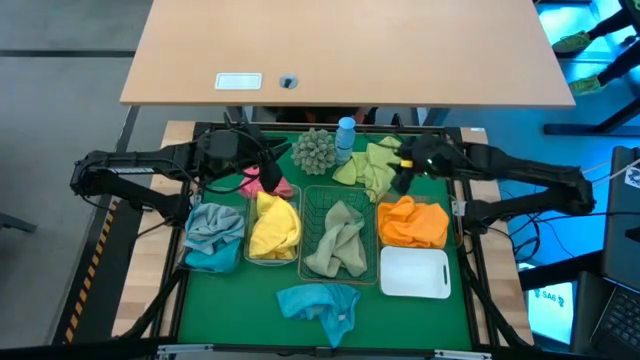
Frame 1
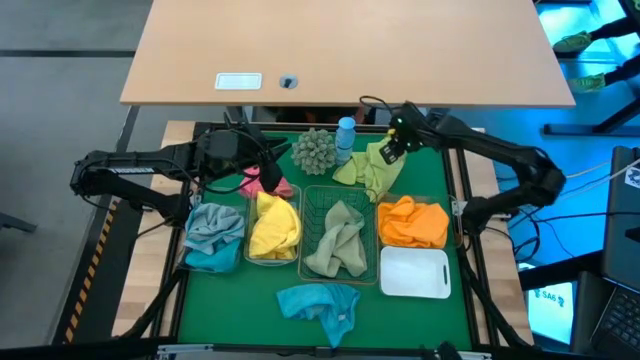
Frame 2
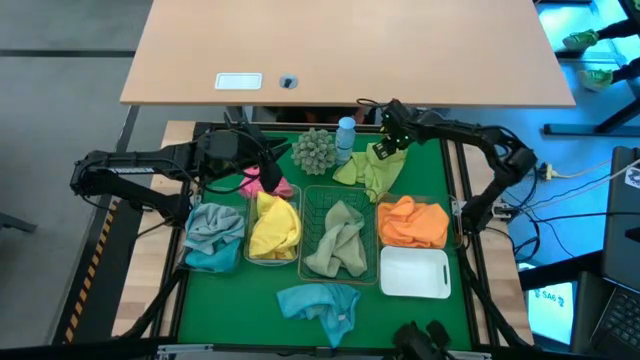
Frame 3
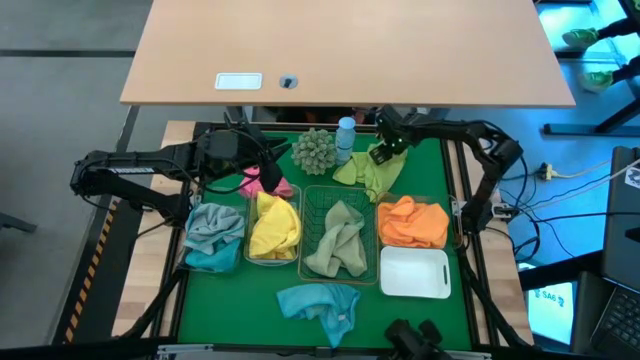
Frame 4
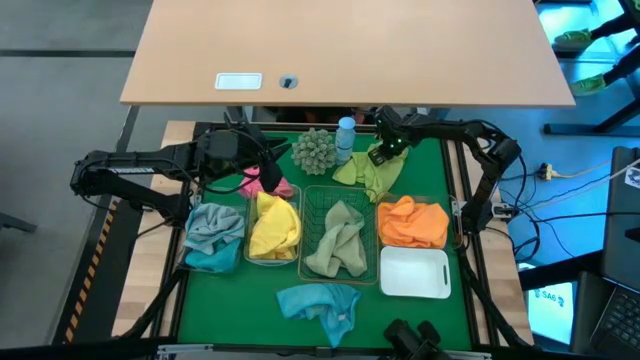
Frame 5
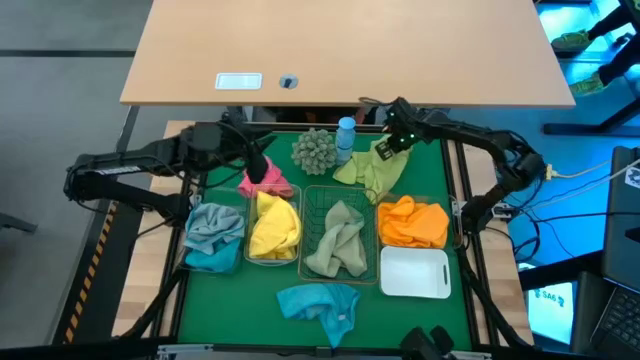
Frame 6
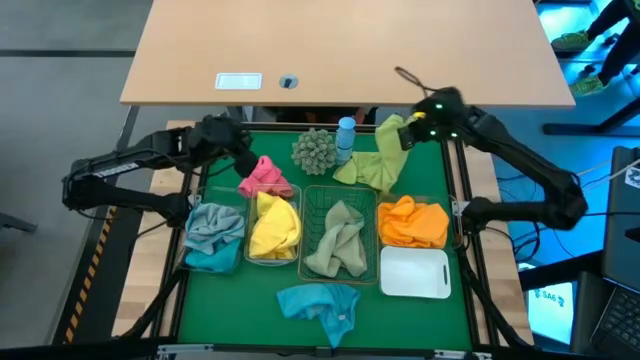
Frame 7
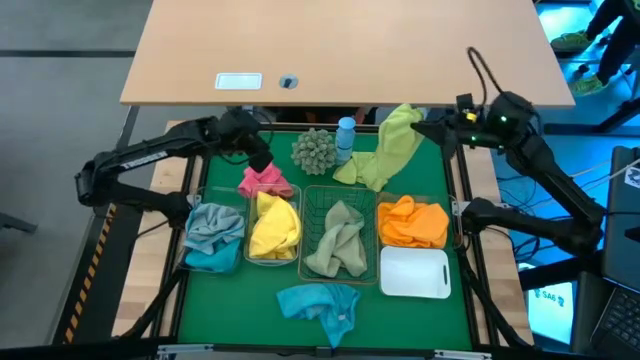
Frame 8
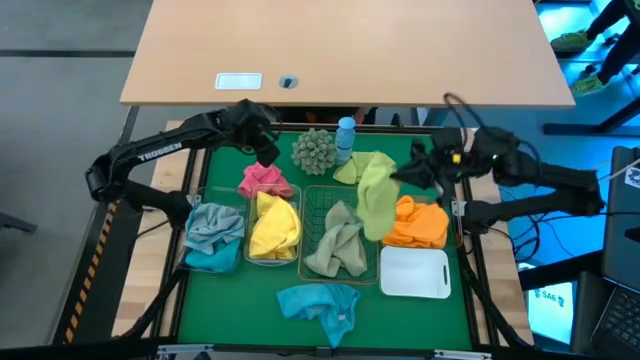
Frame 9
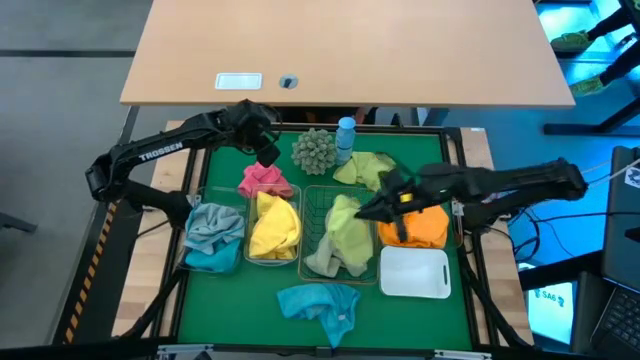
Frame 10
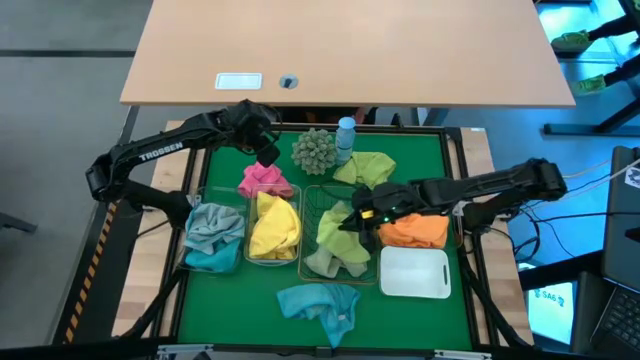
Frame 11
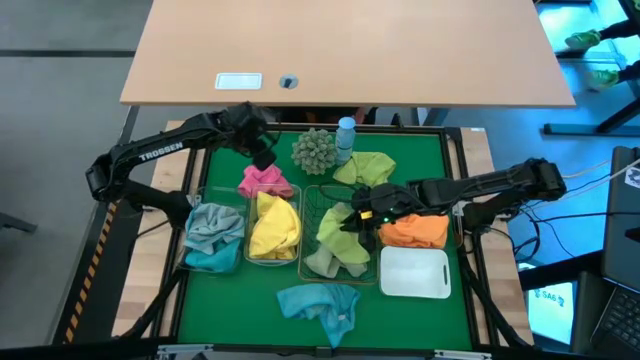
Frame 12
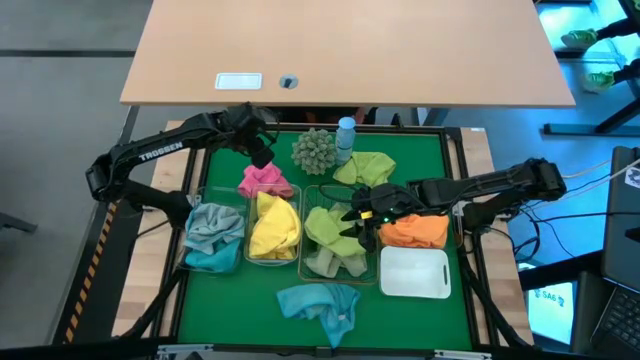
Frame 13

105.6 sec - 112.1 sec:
Task: Sort microfiber towel by color & place in baskets
Put the top right green microfiber cloth into the black wire basket

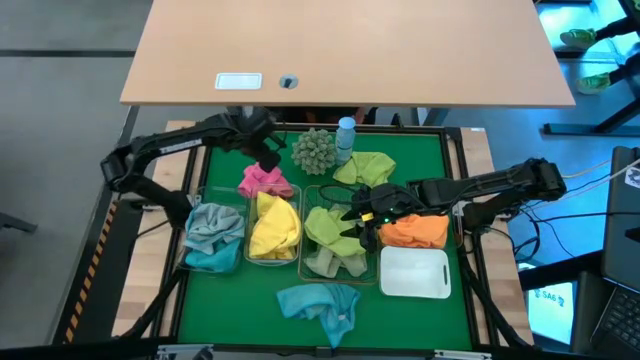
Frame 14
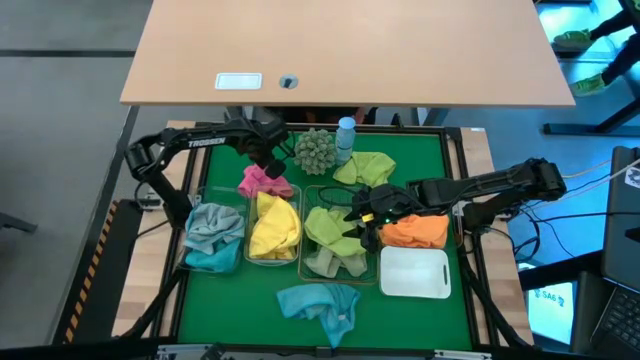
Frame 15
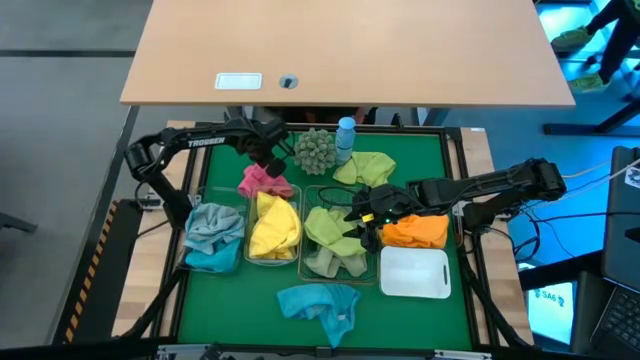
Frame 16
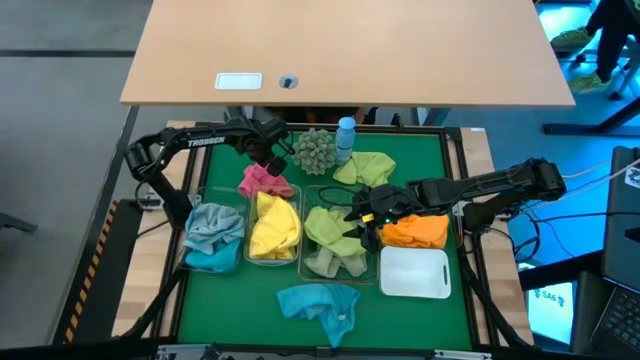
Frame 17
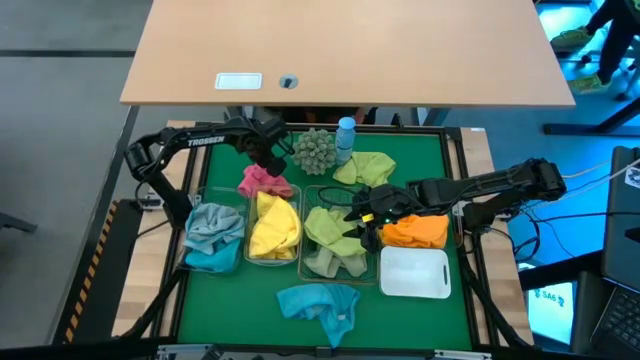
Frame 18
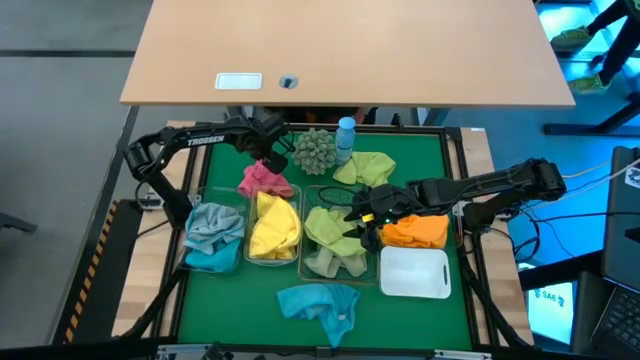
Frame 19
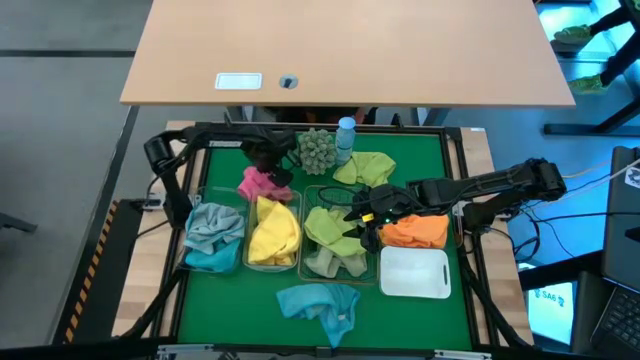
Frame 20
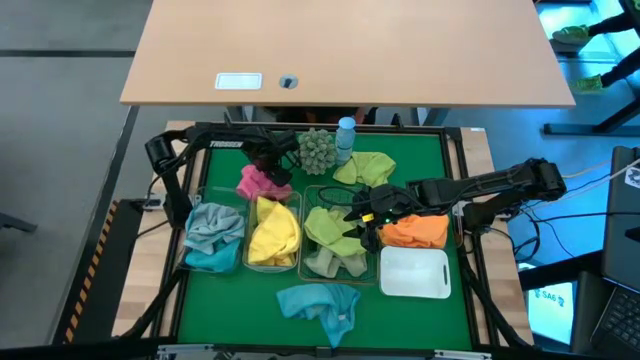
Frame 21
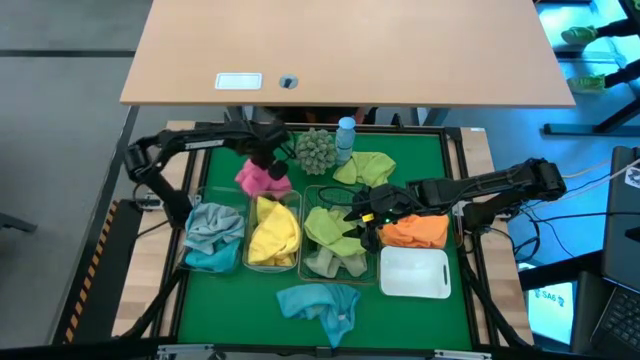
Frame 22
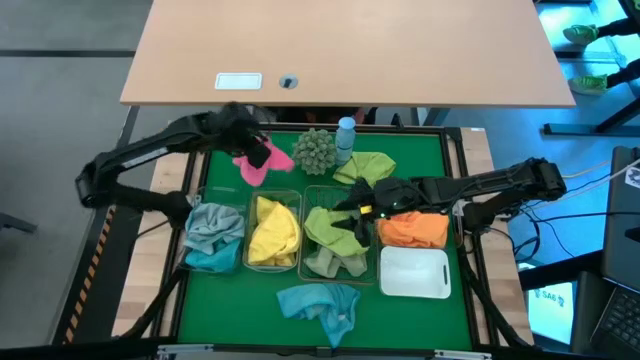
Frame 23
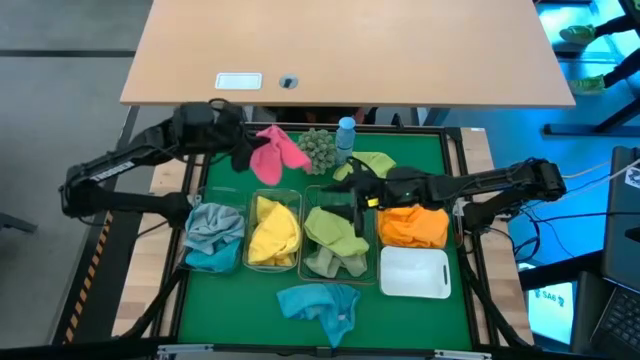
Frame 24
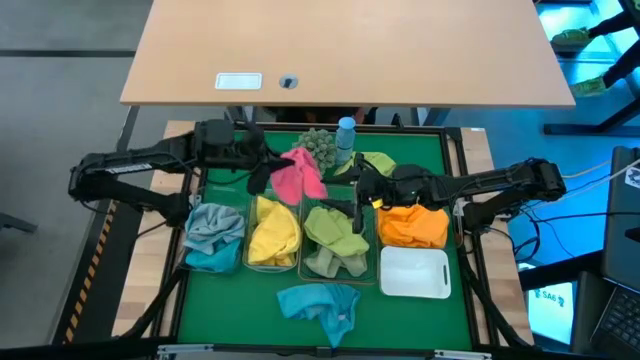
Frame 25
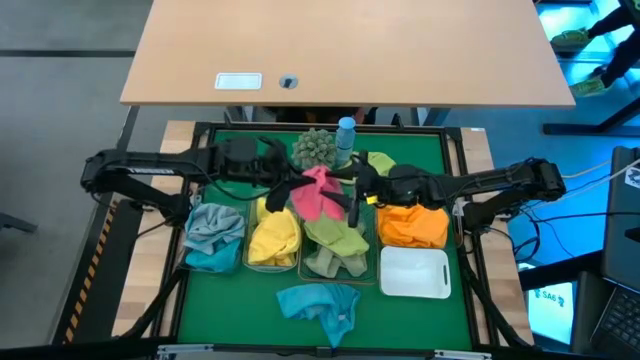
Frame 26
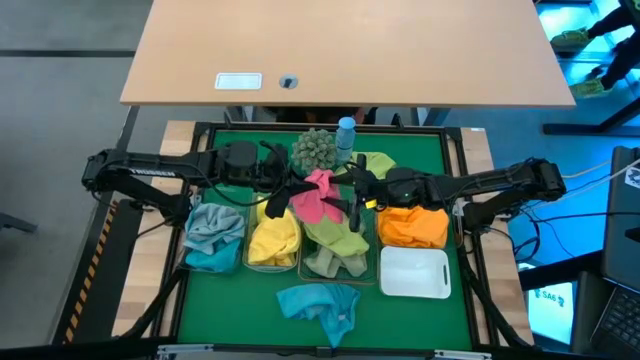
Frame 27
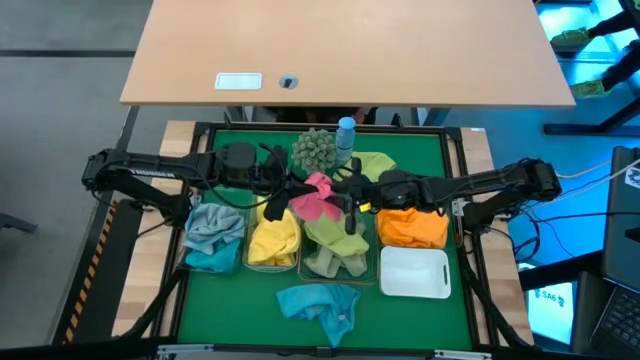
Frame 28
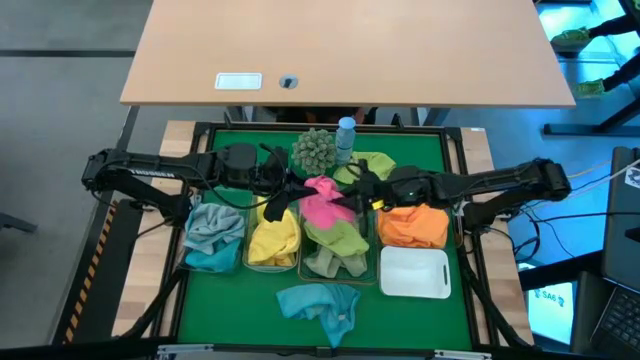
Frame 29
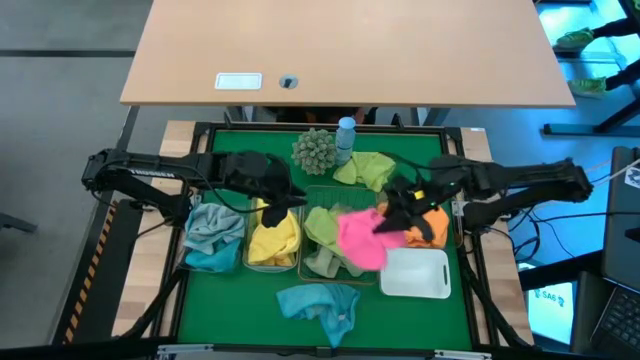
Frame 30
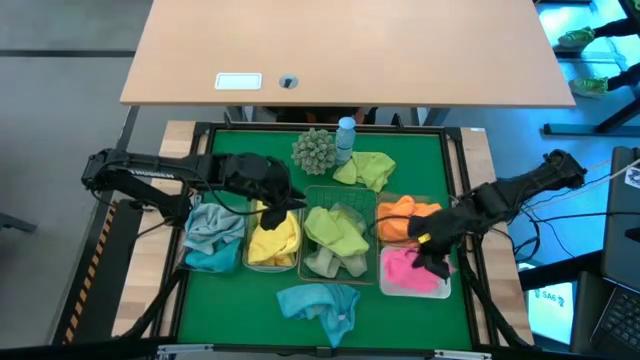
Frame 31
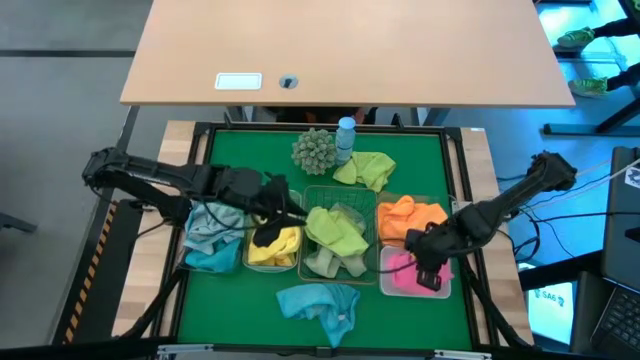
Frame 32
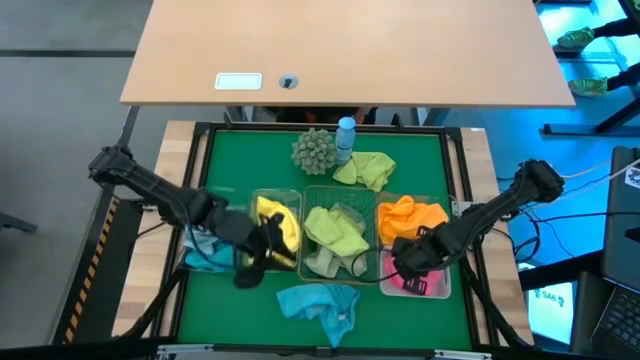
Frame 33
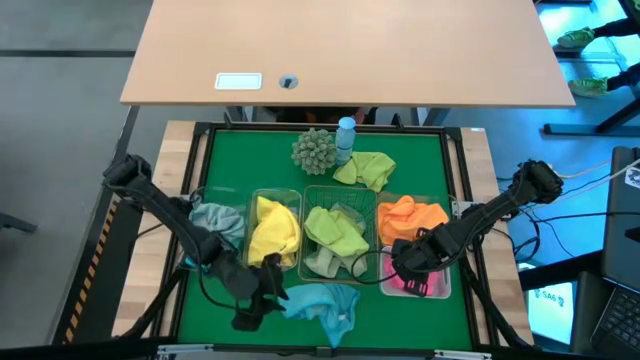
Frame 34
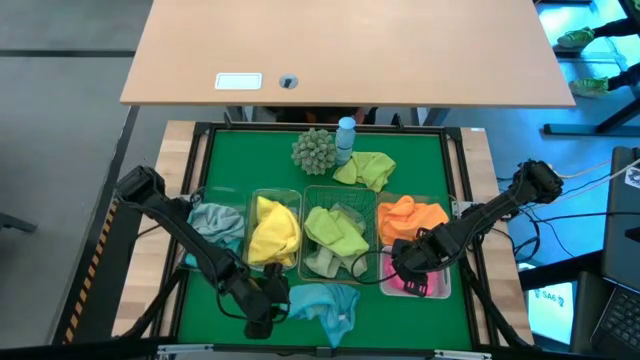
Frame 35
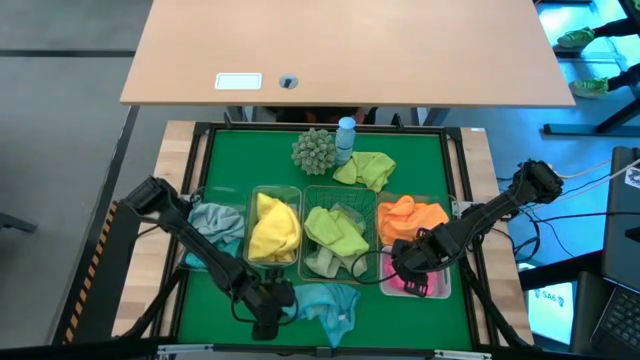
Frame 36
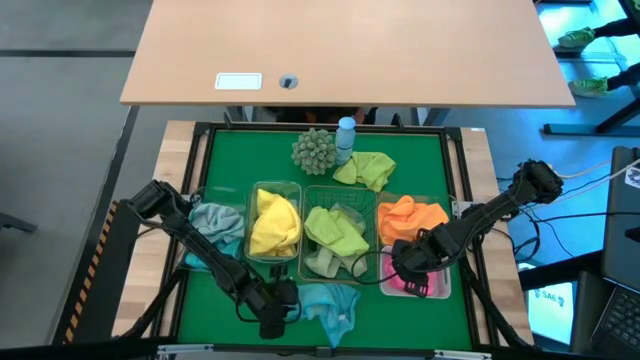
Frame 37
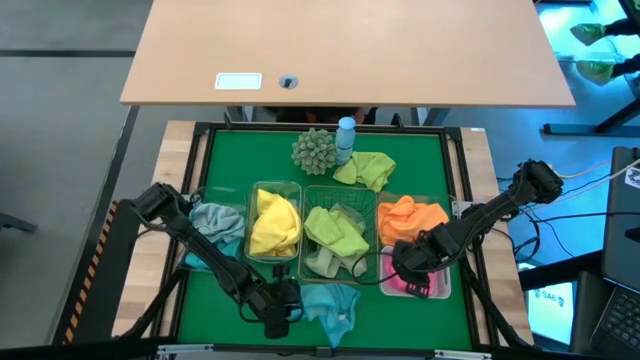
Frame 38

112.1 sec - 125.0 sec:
Put the pink microfiber cloth into the white bin

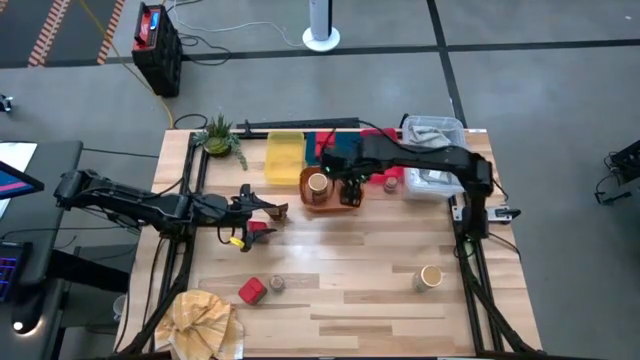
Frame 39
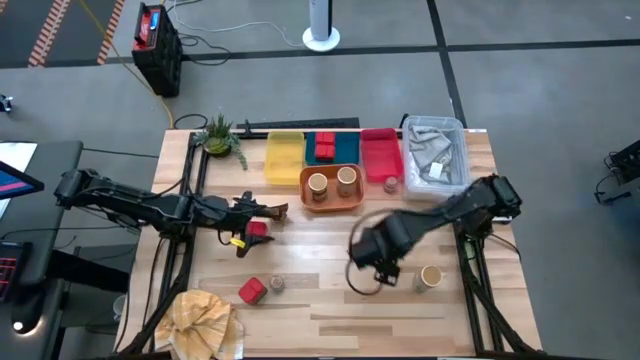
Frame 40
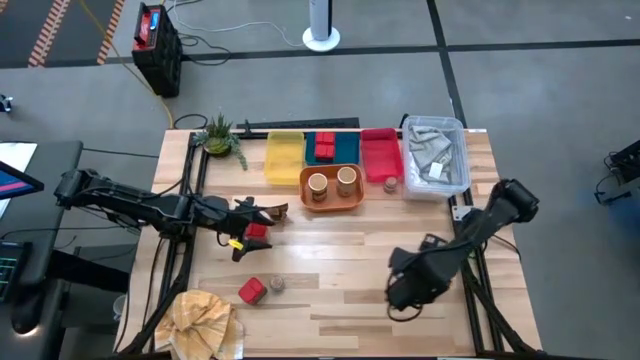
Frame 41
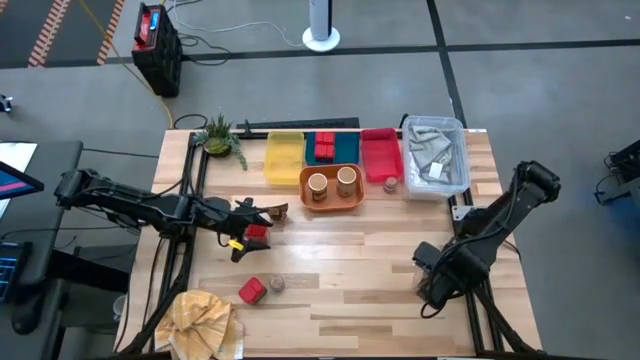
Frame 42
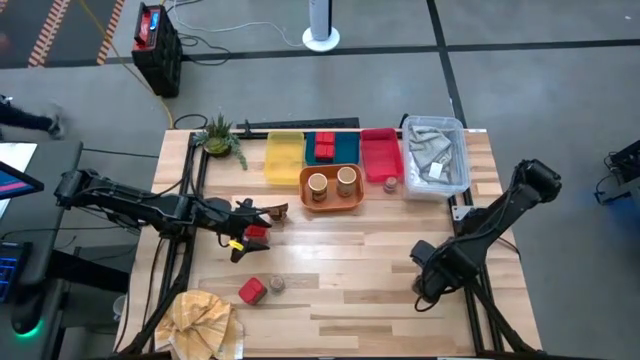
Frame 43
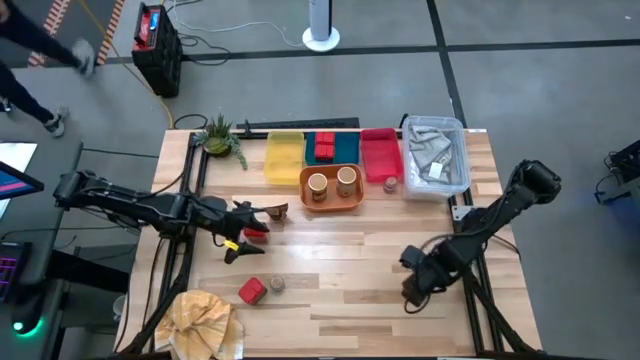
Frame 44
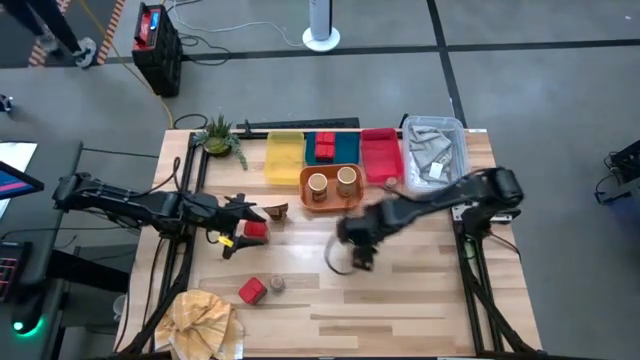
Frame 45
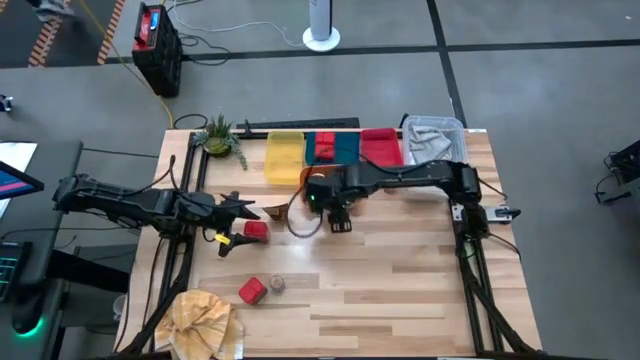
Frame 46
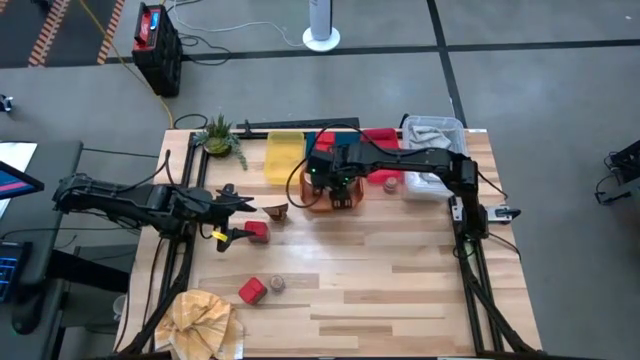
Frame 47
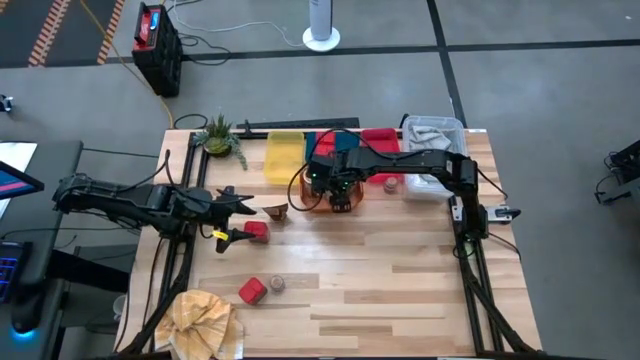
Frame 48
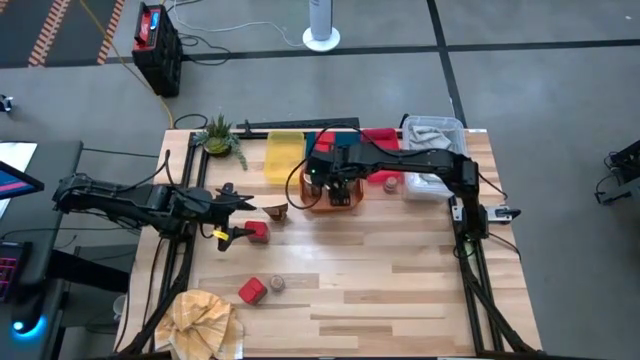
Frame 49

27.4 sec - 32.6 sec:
Task: Sort spices by type
Put the brown seasoning bottle into the orange bin
